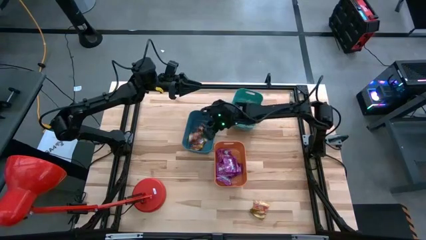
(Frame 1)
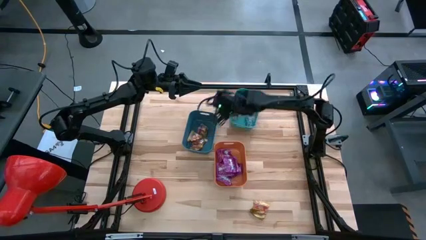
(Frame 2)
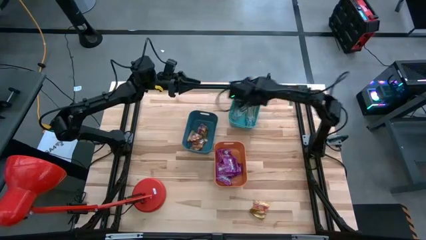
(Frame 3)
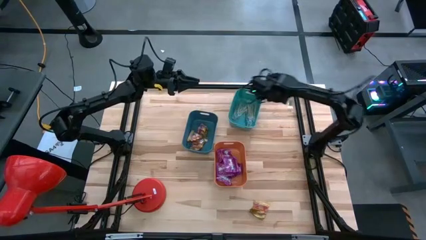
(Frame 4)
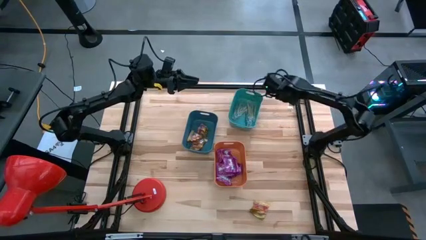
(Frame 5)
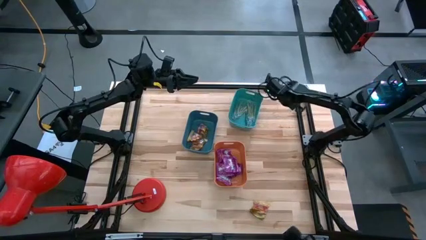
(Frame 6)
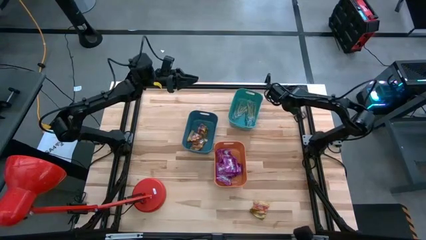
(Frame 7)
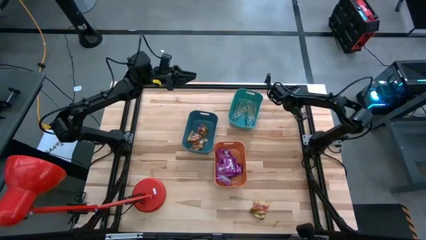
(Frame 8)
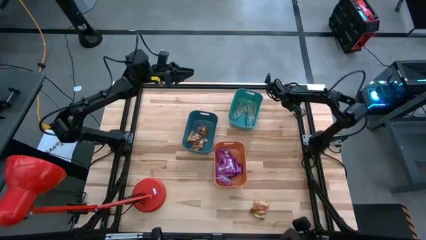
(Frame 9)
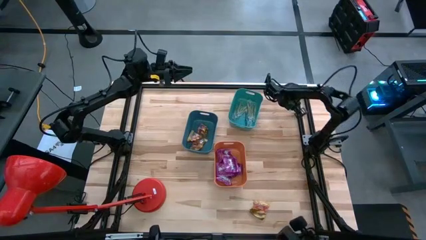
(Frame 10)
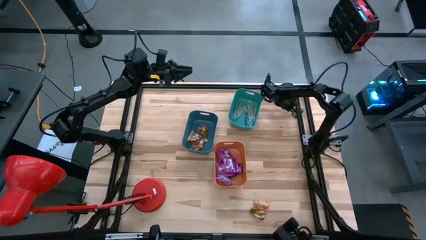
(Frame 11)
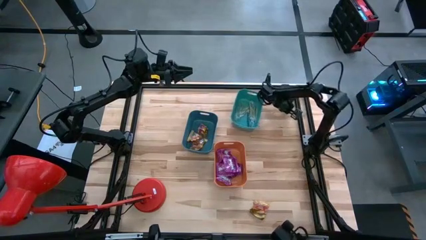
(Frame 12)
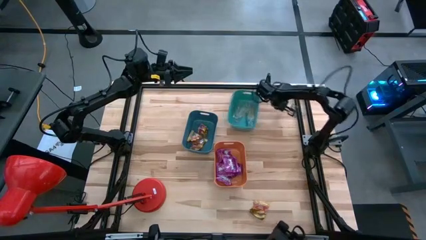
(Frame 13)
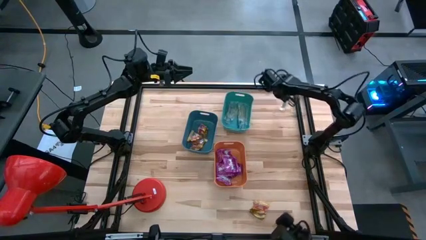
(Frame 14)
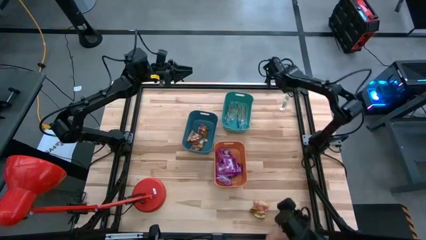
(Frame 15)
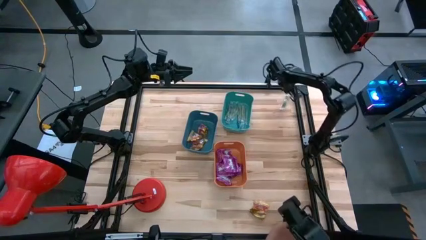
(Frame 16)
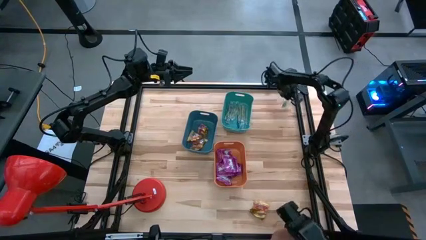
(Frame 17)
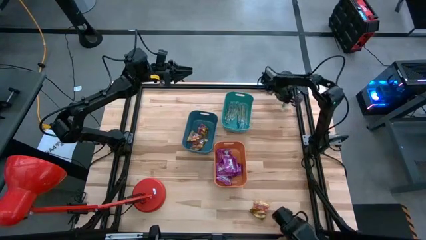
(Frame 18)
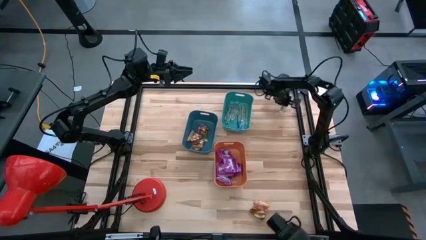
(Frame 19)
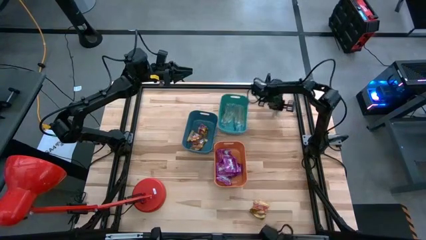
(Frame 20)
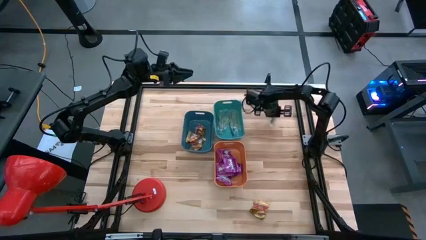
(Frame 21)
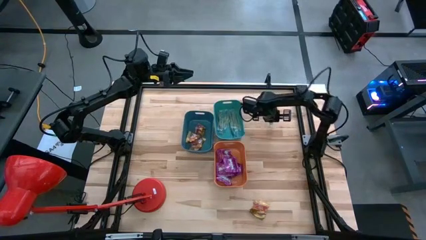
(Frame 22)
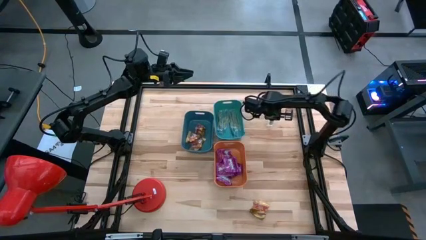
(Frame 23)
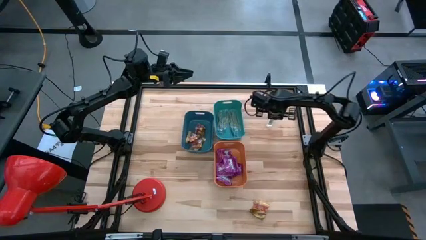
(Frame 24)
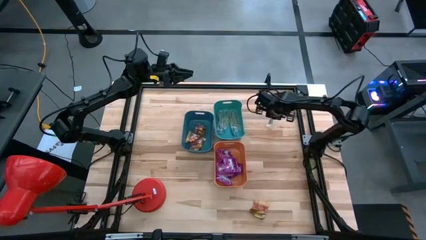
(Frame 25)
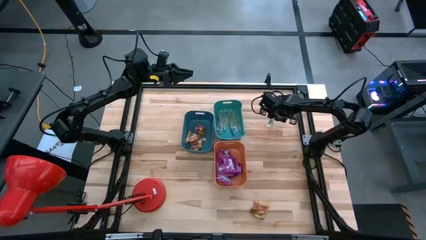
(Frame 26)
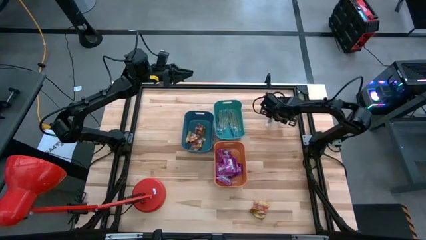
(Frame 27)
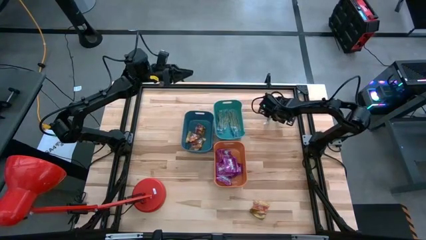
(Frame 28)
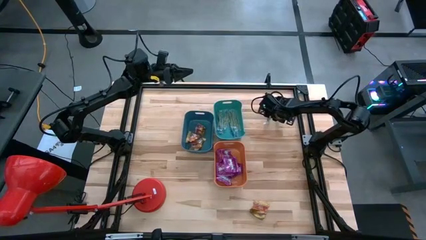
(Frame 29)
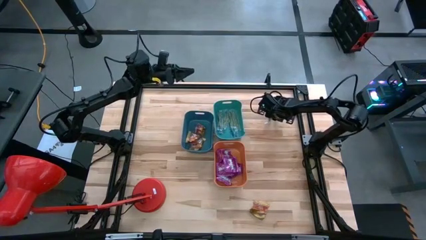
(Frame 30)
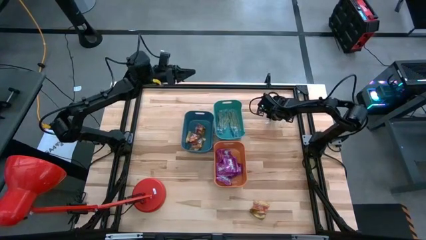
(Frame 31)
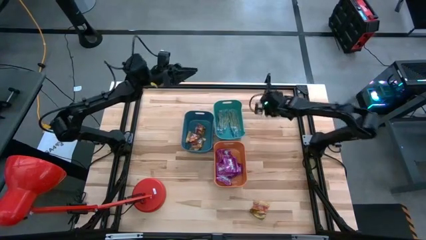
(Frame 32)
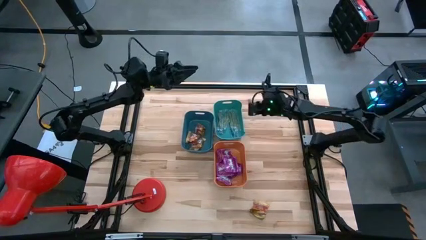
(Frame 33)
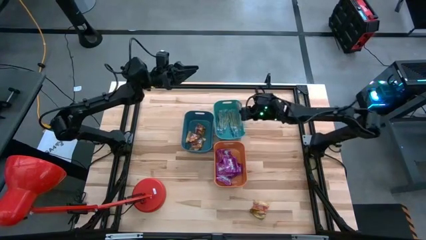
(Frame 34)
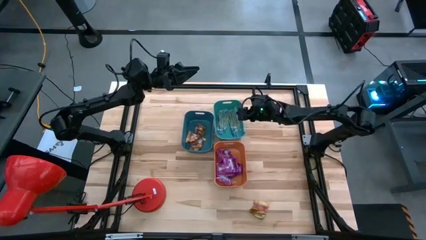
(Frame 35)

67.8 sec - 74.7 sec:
Task: Sort candy
Put the green gummy into the green bin

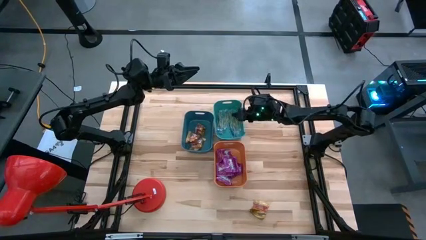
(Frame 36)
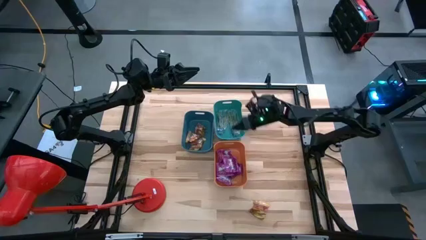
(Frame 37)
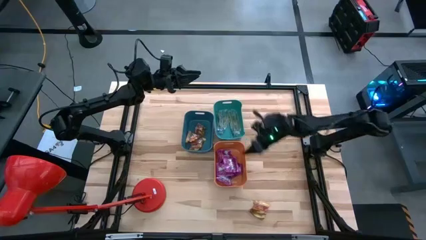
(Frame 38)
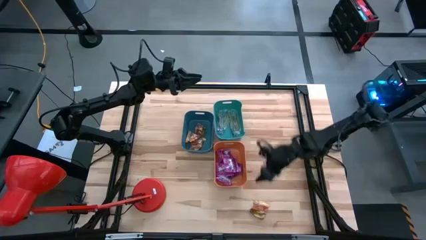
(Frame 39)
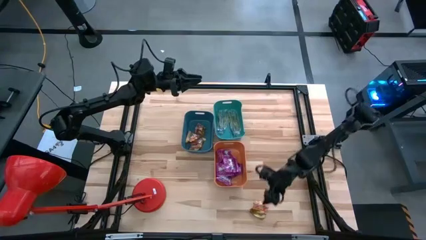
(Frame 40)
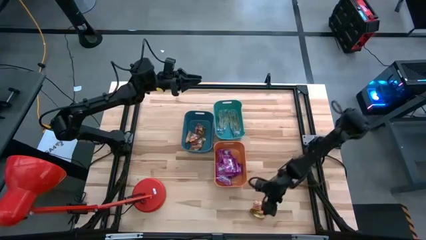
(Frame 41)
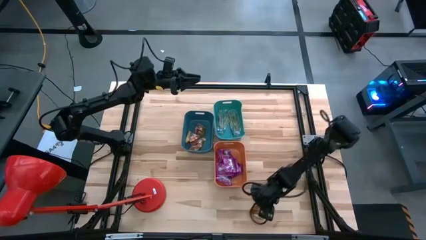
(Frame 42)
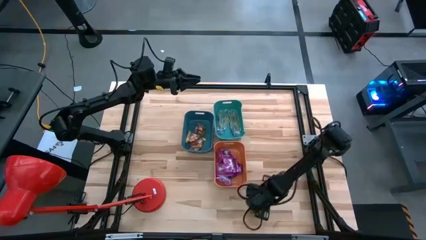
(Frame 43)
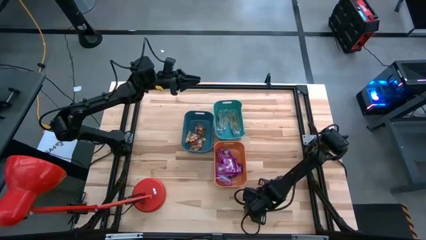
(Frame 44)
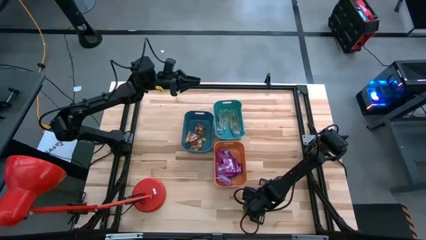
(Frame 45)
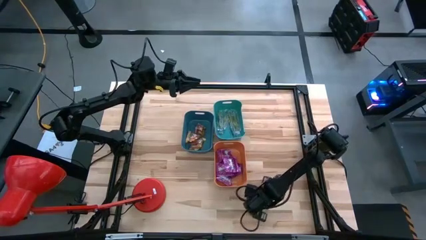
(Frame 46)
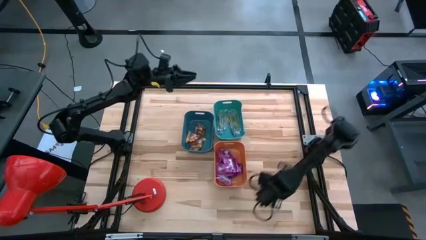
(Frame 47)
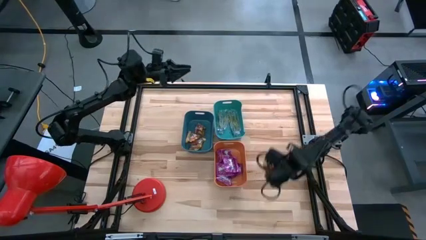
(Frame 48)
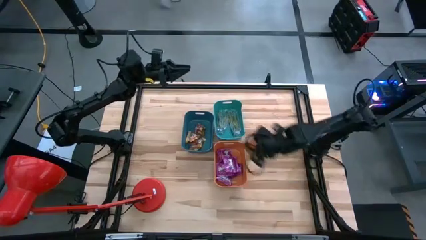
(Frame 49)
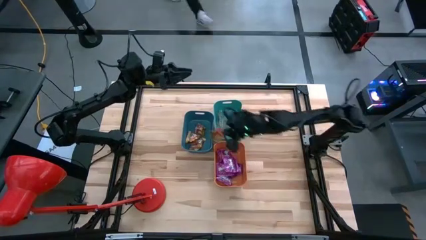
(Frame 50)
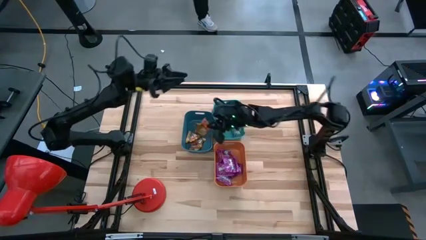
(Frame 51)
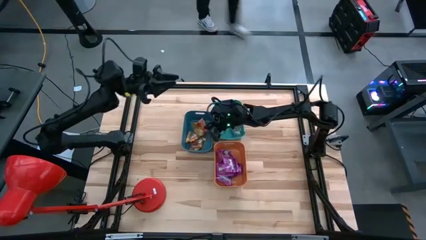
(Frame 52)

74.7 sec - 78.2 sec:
Put the yellow candy into the blue bin

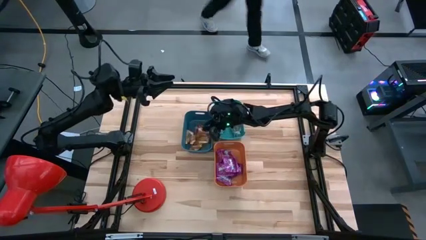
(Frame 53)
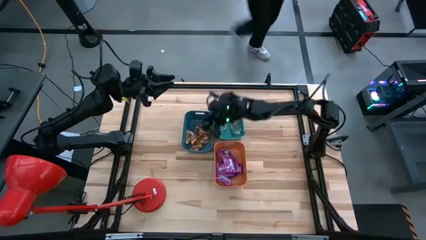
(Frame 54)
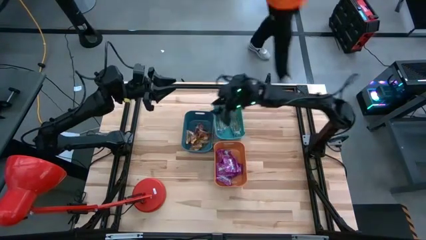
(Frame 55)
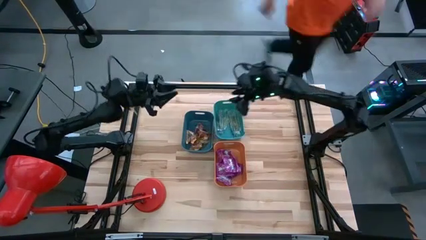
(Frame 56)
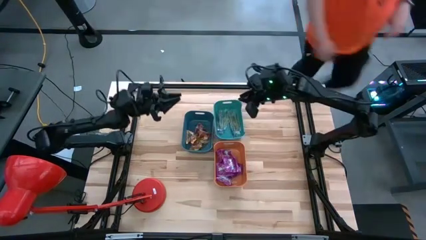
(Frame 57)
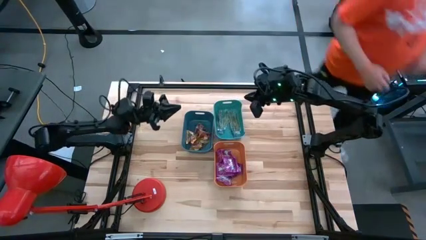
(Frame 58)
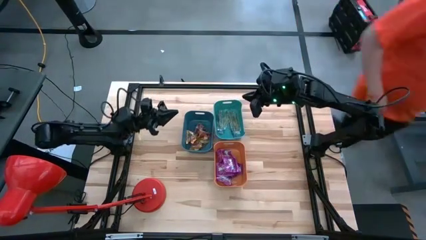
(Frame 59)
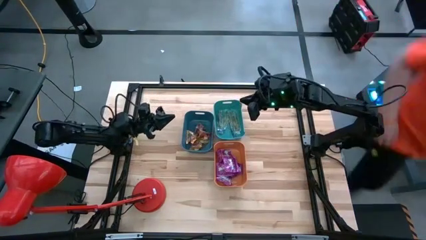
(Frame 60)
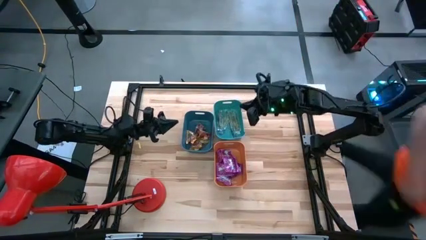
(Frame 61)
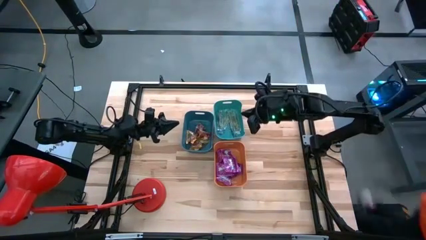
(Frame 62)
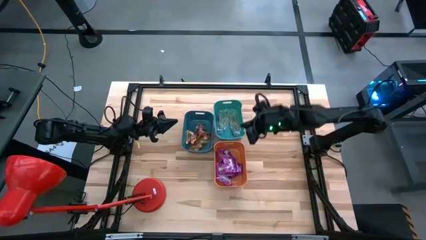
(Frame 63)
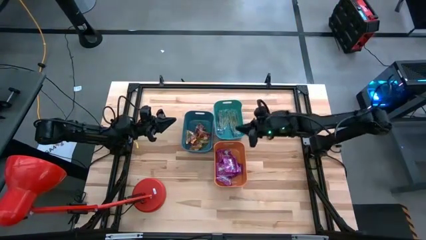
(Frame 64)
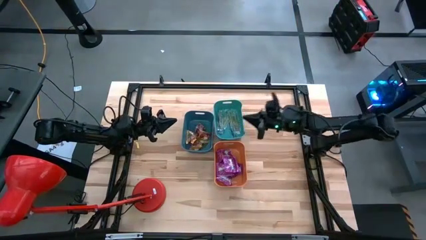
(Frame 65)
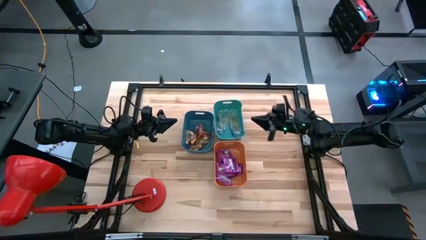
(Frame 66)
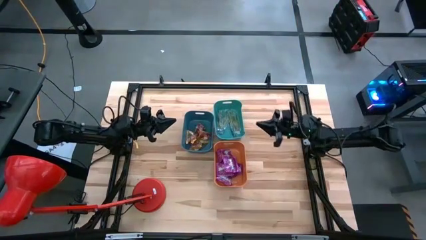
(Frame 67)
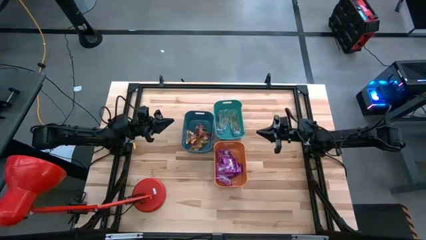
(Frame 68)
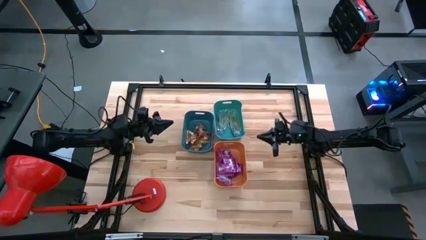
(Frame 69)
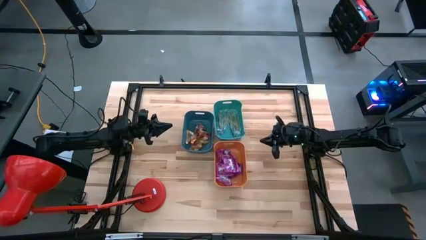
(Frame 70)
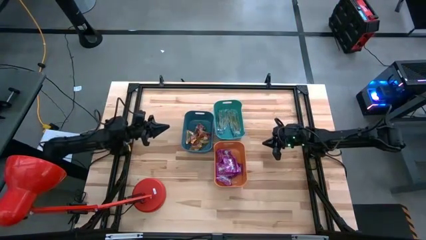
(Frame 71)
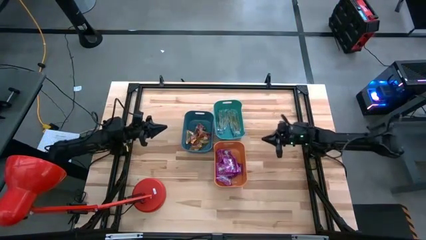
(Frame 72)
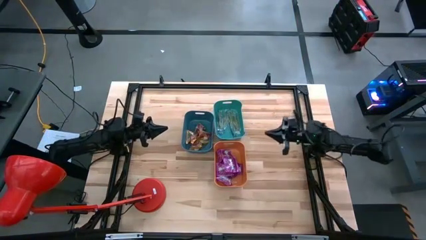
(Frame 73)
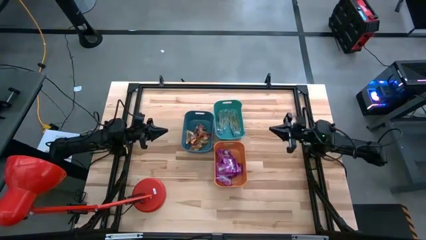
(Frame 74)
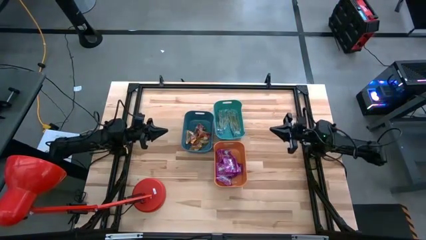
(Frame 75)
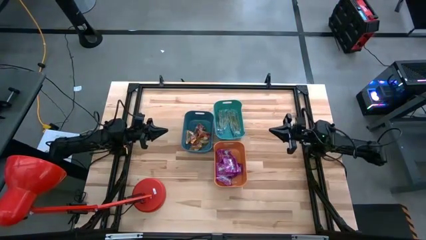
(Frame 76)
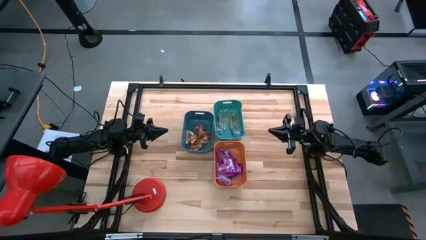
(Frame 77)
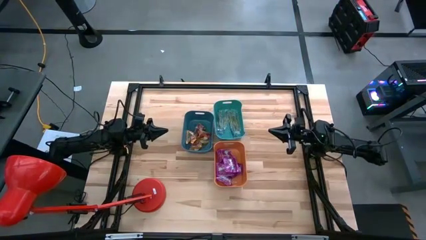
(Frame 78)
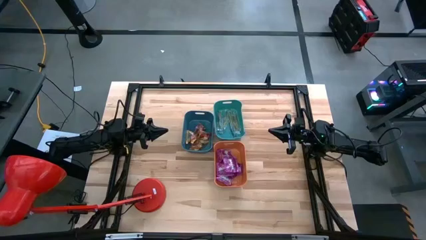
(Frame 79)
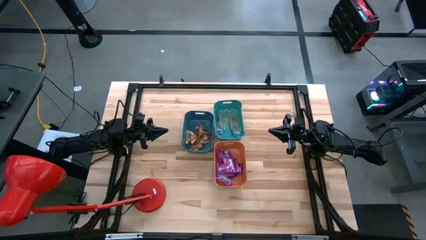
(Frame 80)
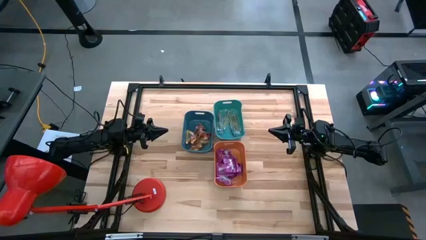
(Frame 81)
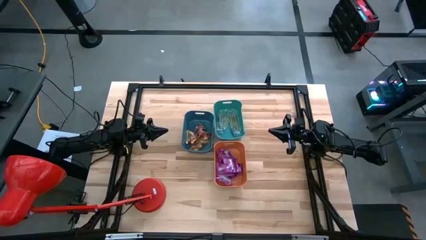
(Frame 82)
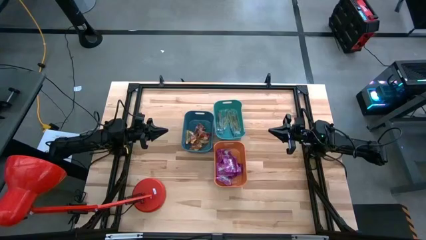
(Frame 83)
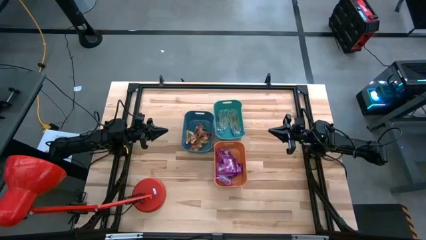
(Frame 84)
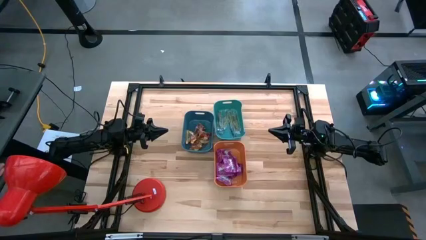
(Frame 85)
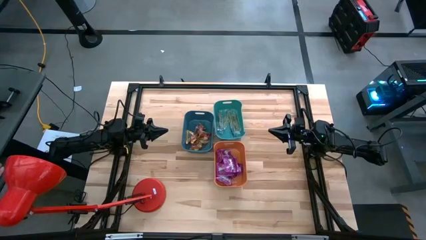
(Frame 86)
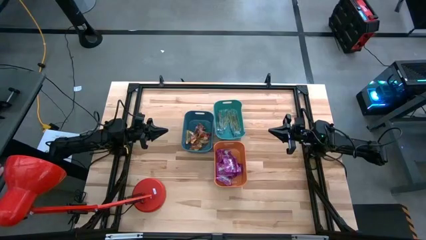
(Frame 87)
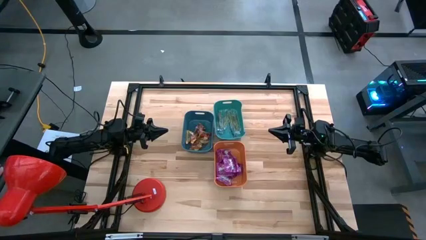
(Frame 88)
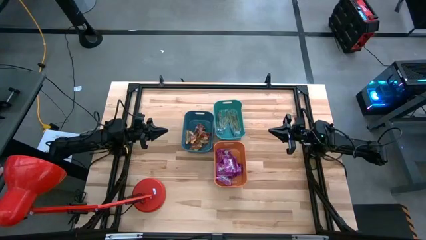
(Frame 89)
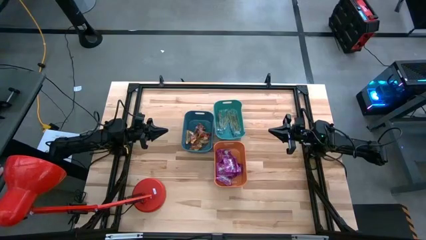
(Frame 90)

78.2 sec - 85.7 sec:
Return to Home Position
